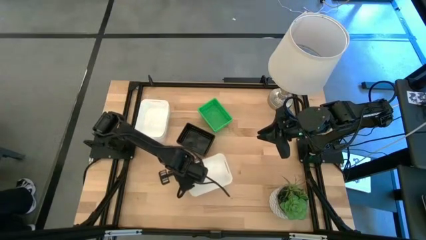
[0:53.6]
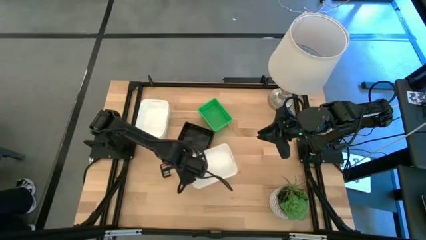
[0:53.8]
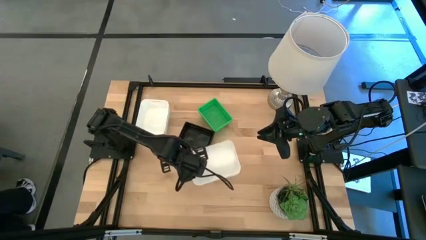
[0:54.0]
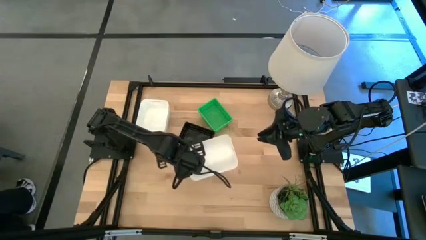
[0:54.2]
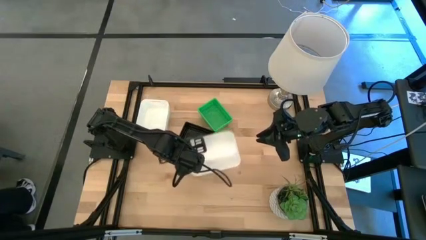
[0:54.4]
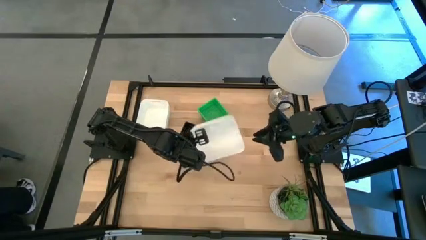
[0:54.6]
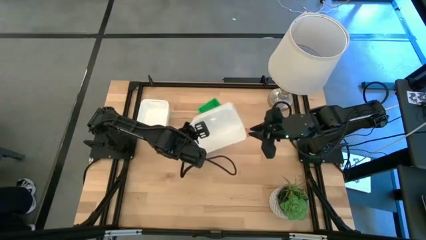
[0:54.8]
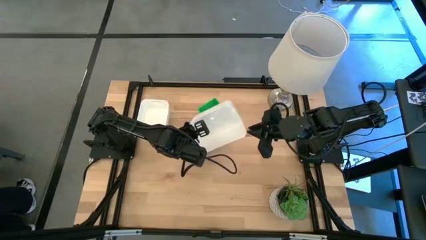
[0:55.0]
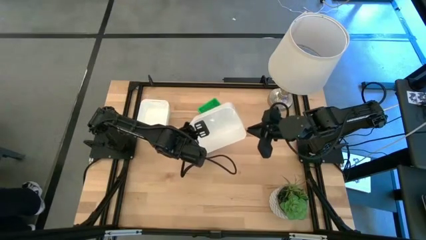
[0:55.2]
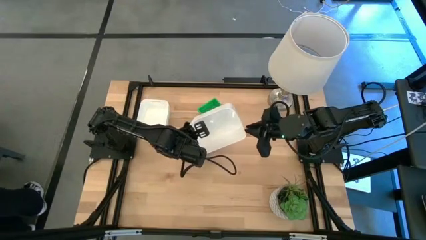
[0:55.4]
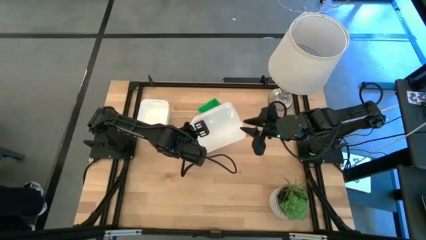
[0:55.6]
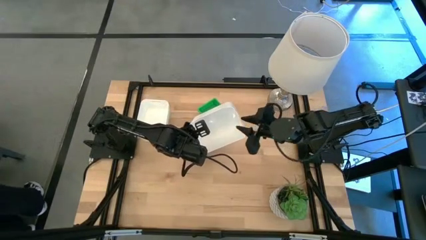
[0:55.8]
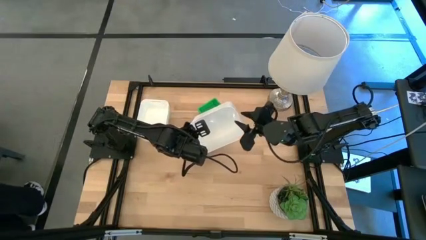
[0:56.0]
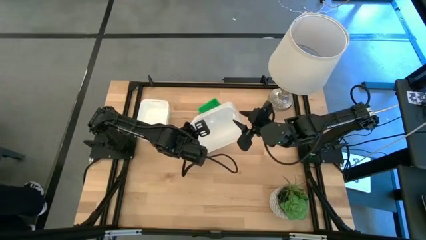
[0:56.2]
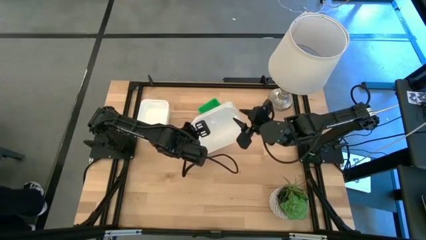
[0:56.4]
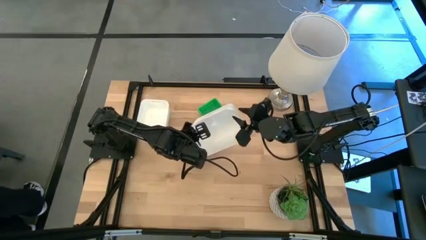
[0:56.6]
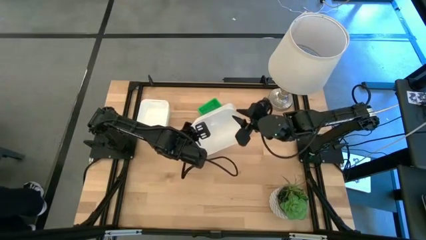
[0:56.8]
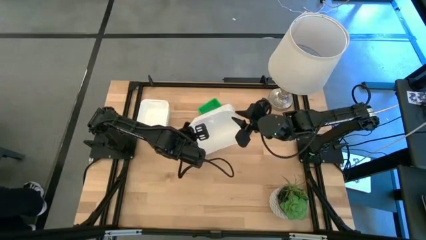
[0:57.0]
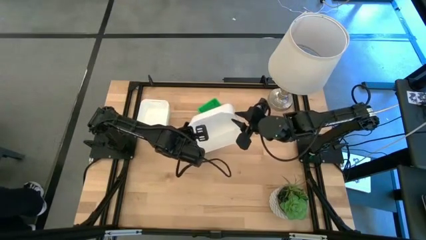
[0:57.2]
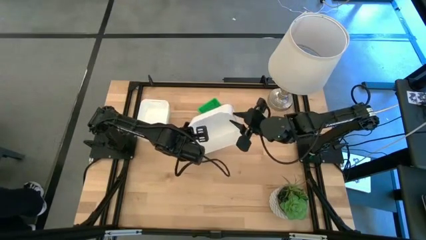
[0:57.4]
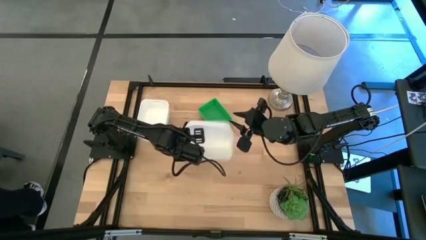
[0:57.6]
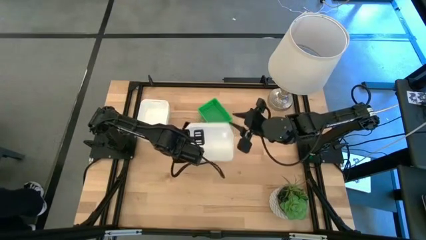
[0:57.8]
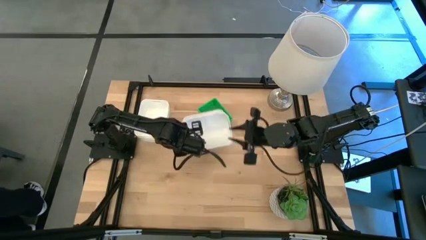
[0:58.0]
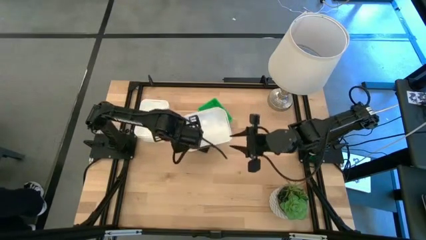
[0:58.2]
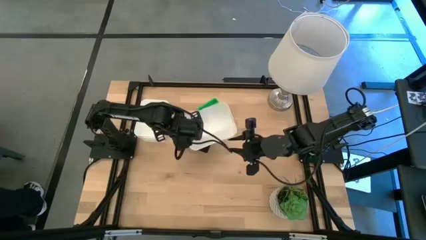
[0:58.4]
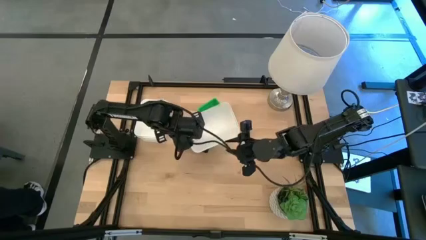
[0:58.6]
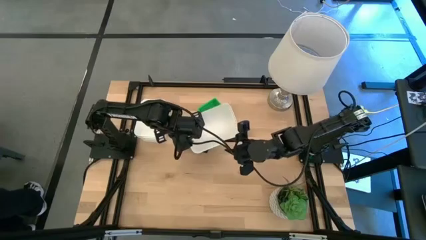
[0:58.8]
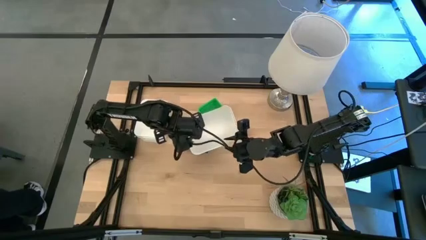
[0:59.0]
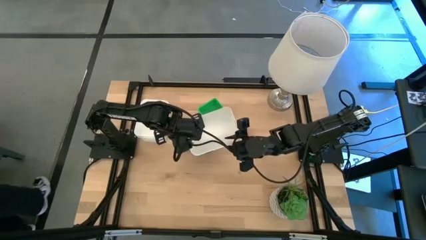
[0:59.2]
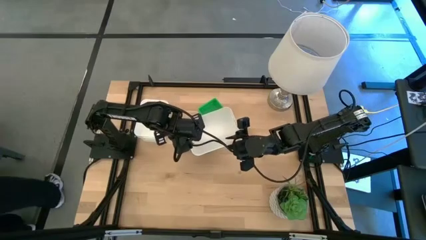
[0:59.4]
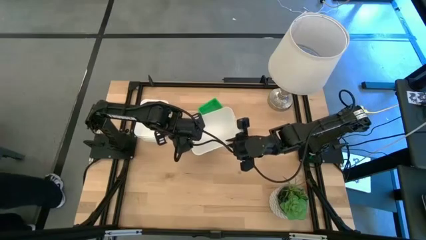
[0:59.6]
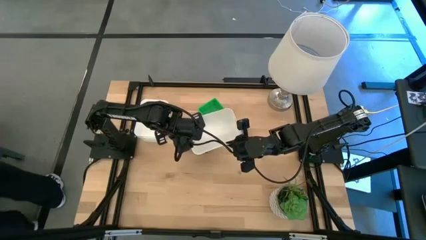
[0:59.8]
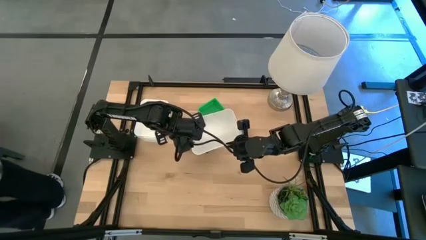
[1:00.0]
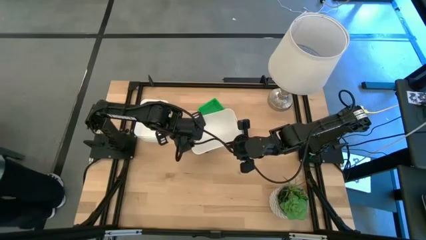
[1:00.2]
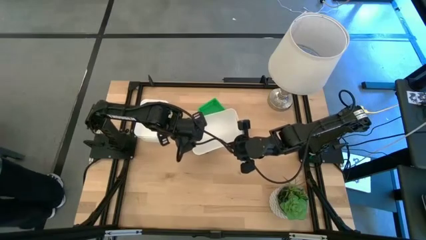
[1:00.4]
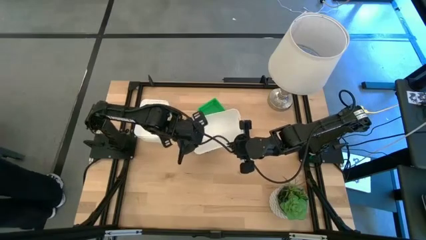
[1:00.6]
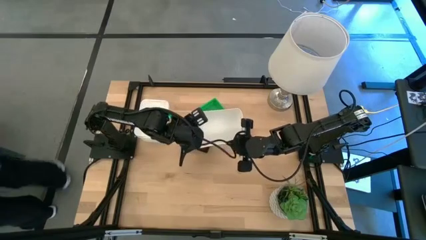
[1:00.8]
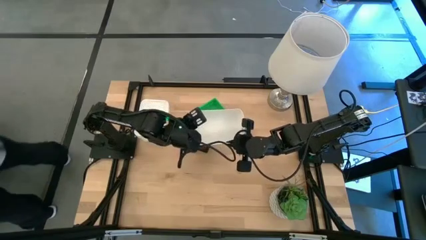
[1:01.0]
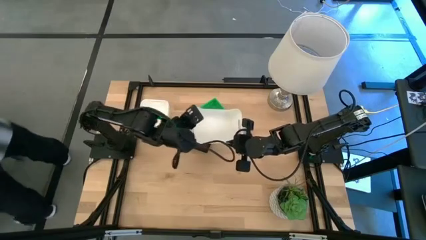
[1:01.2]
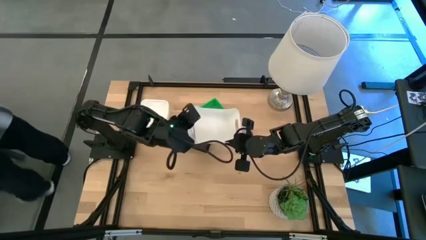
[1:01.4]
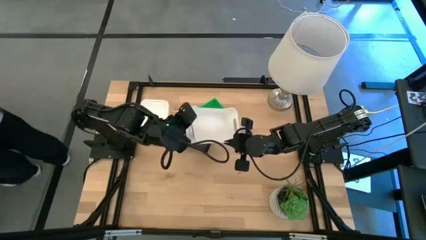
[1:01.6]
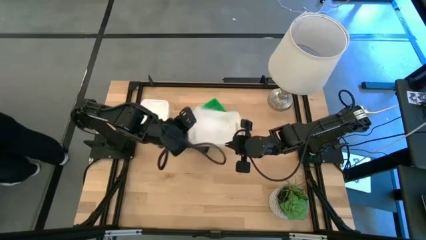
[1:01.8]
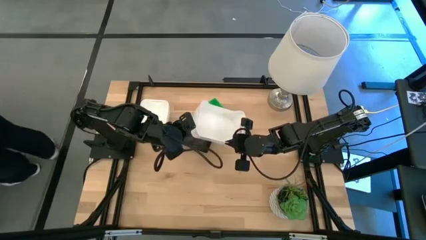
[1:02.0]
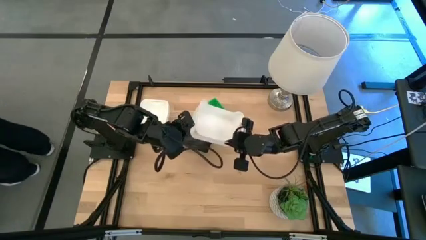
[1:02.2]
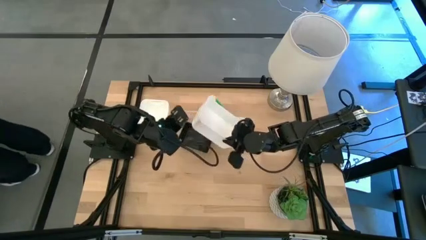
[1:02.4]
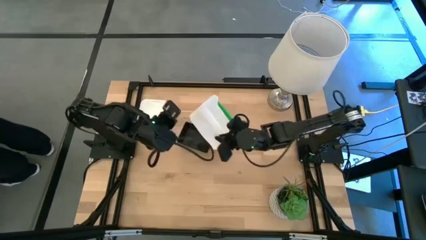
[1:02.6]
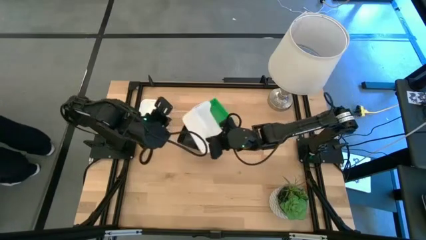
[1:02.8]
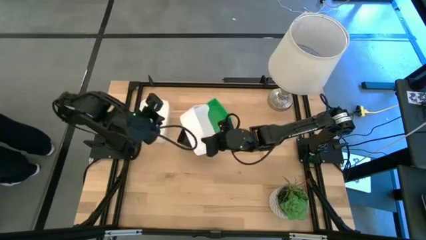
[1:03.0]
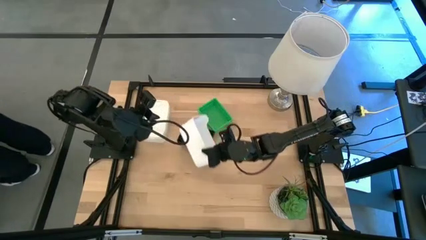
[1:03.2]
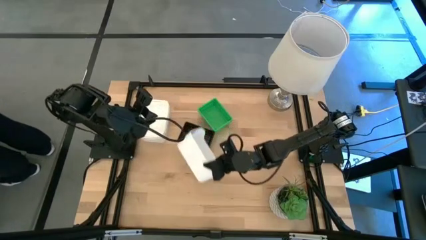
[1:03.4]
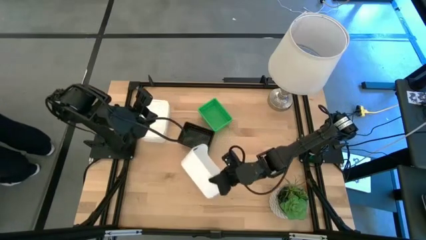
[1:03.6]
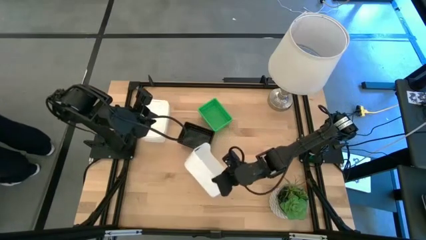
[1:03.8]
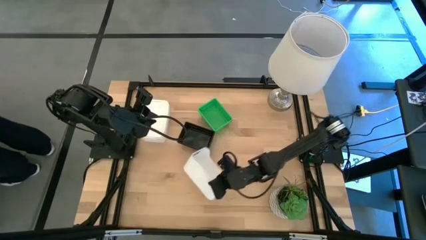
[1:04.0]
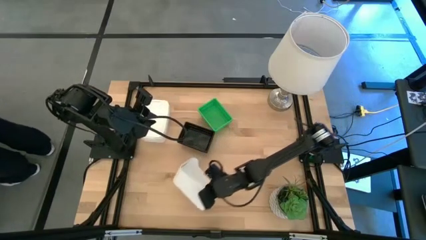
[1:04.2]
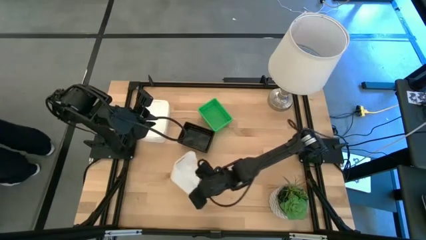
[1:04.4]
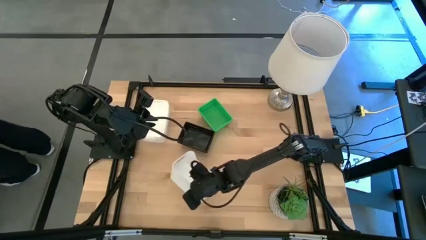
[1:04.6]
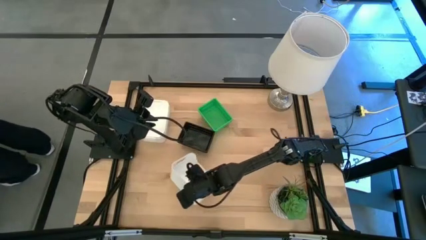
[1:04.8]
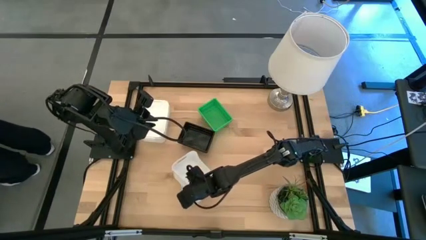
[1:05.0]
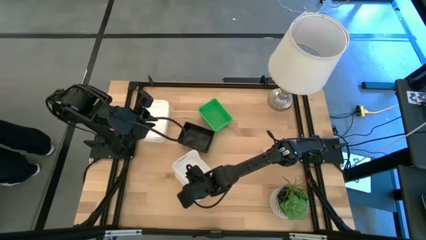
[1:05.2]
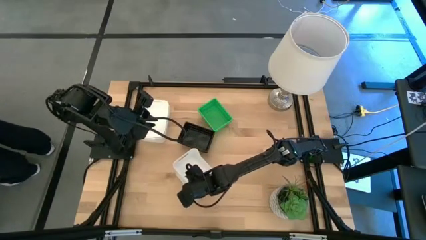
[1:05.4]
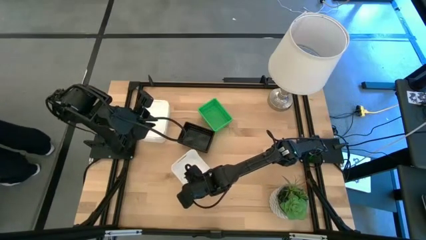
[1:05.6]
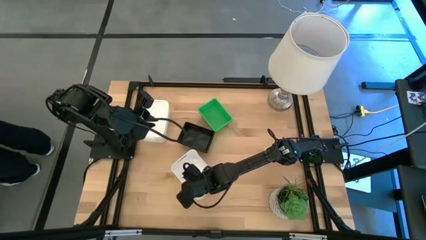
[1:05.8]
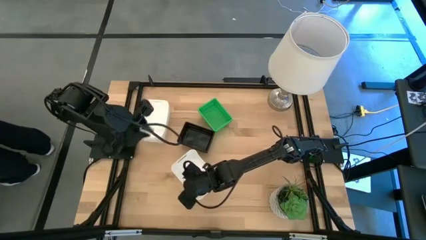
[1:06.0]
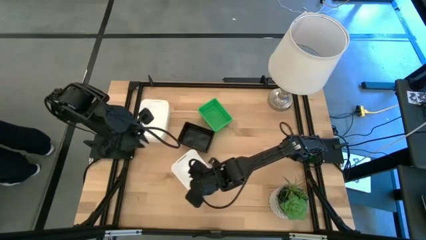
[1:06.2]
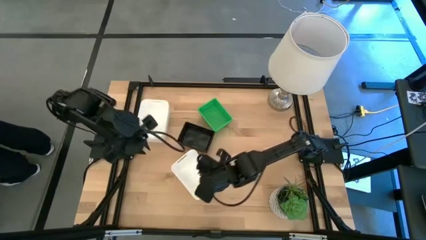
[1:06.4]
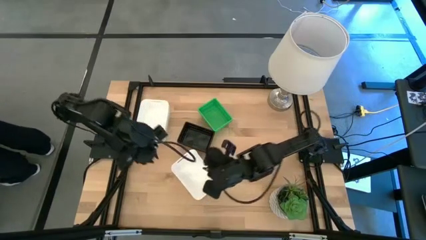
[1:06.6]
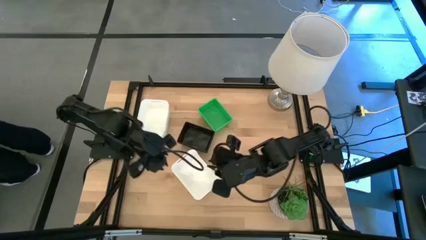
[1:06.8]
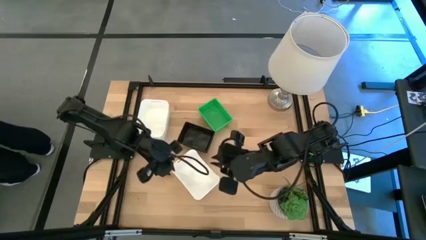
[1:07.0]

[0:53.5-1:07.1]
Stack the right white bin on the left white bins
